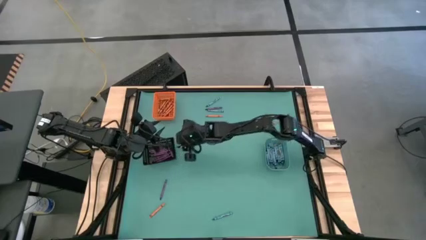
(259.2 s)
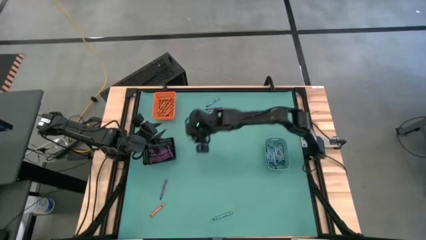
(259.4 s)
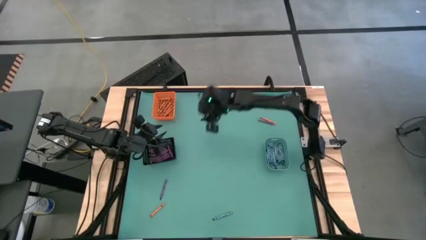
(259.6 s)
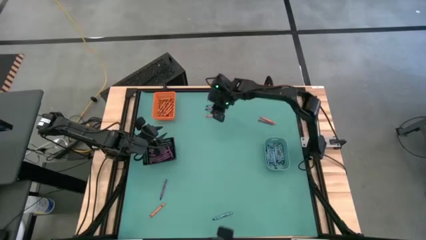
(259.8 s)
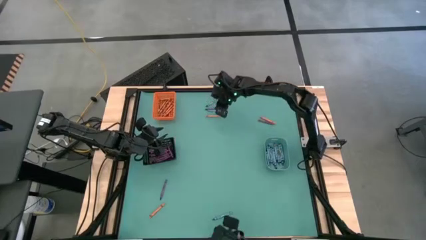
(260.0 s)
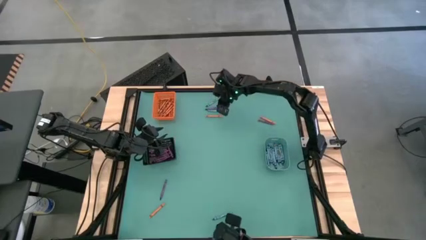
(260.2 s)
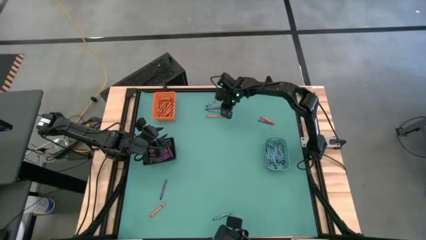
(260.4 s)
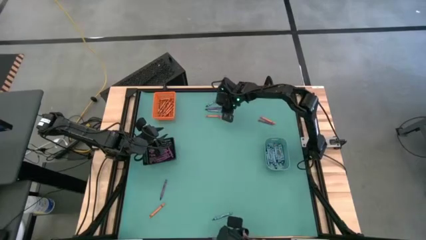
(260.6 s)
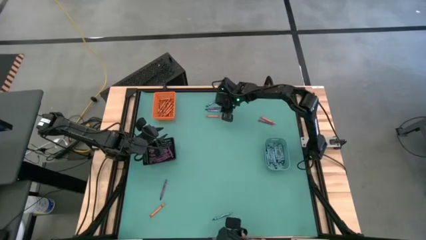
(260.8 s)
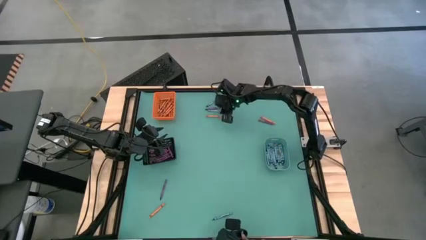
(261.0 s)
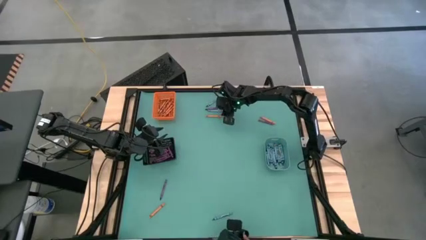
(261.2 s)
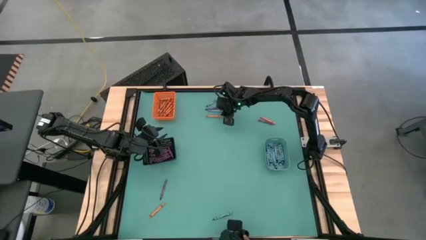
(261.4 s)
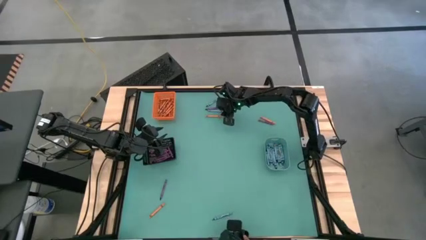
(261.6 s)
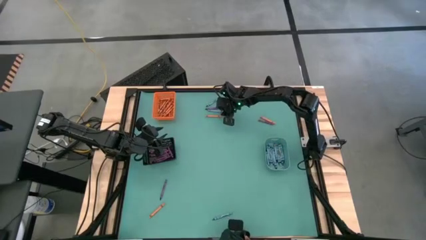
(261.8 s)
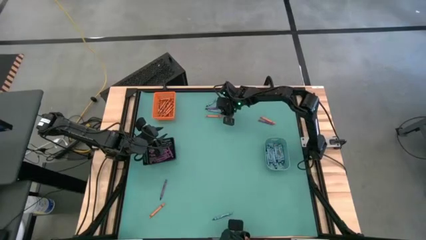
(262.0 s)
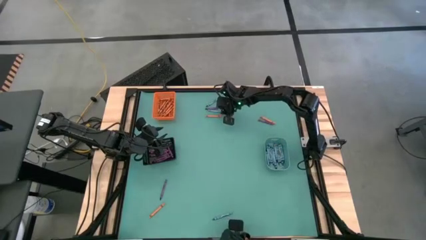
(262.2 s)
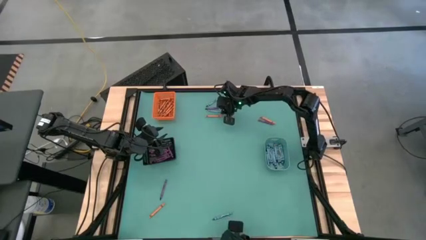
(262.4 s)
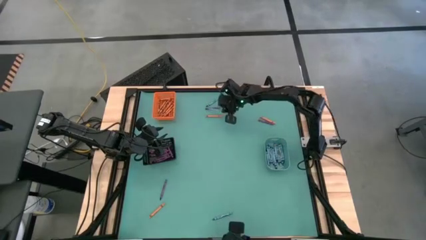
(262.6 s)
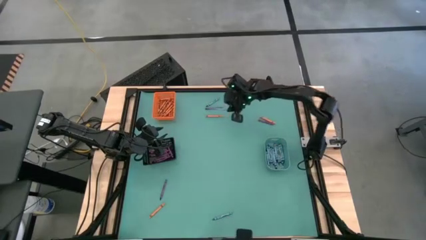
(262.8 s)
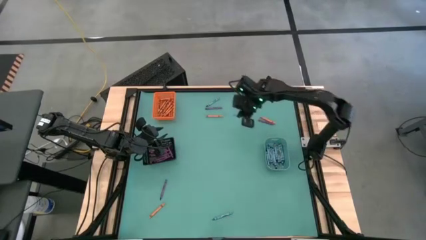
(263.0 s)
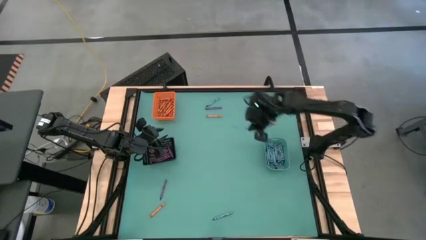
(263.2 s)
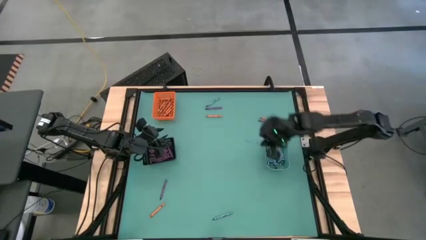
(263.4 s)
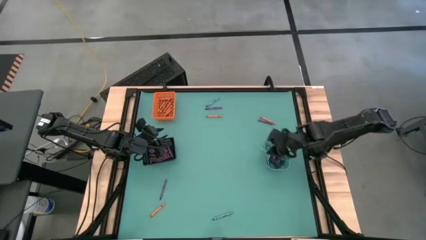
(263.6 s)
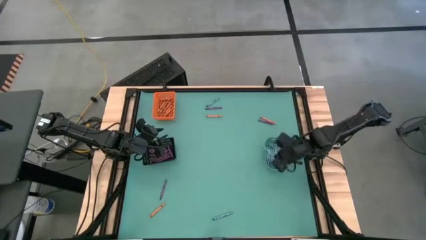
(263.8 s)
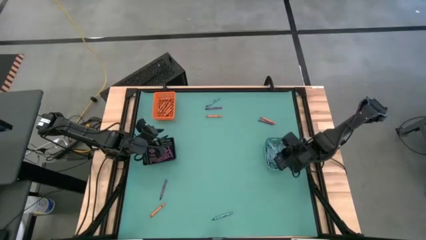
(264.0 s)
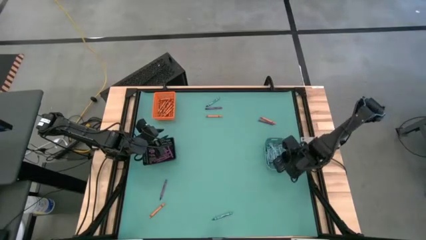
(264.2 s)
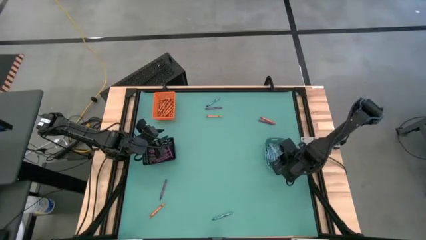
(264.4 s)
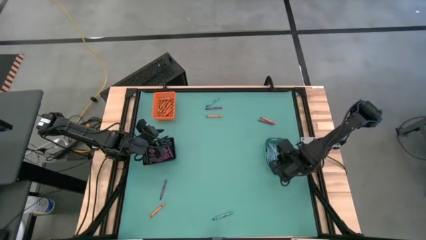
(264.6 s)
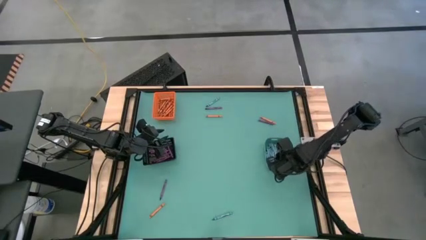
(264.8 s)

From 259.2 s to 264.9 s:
Task: Sort crayons
Put the light blue crayon into the blue bin

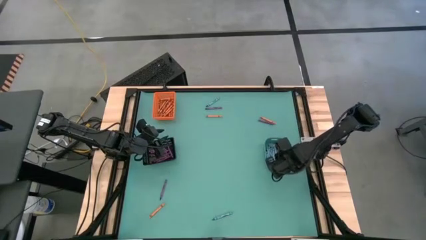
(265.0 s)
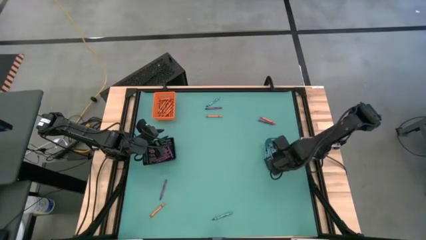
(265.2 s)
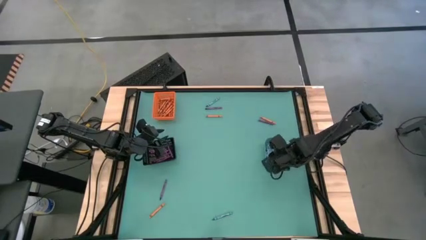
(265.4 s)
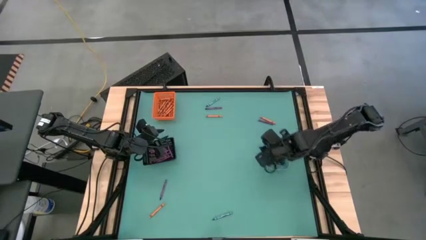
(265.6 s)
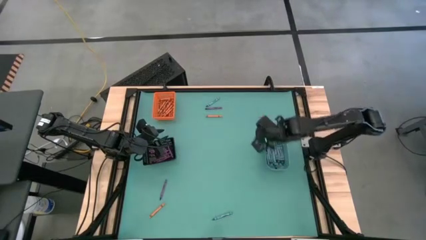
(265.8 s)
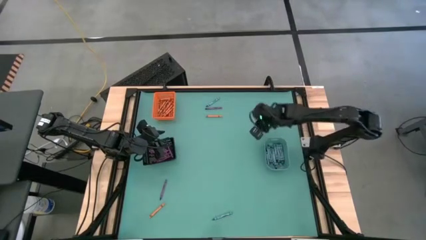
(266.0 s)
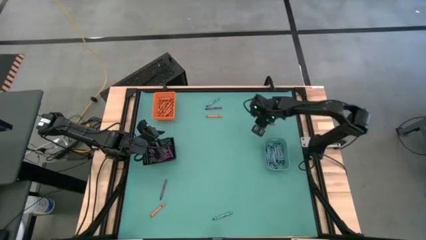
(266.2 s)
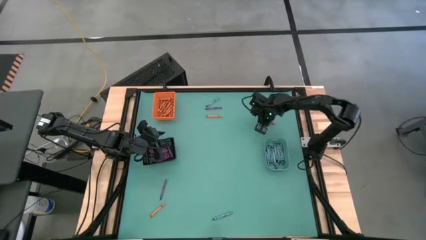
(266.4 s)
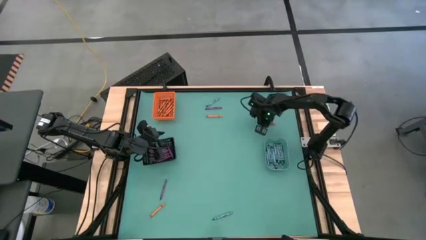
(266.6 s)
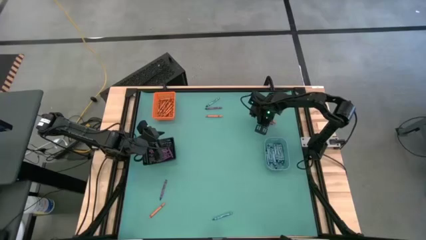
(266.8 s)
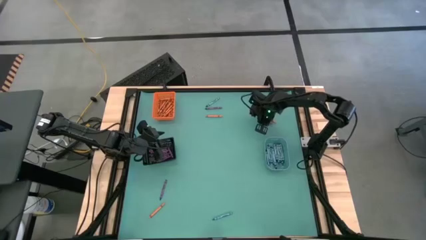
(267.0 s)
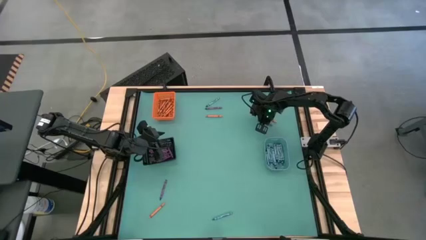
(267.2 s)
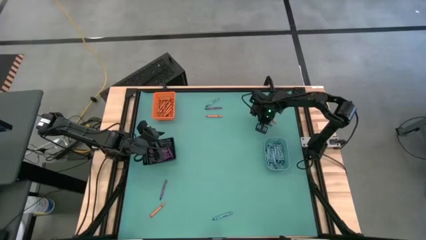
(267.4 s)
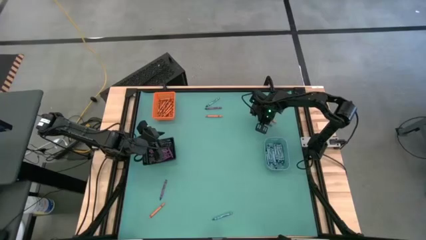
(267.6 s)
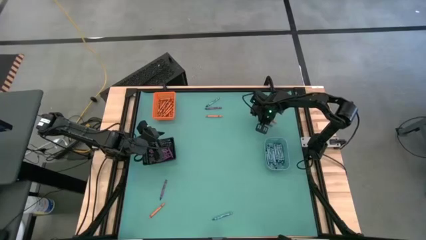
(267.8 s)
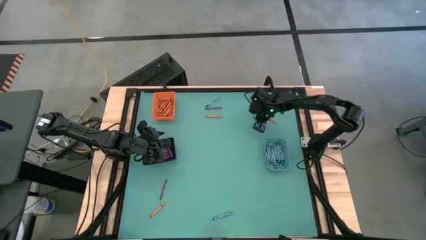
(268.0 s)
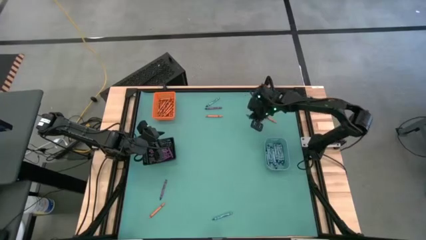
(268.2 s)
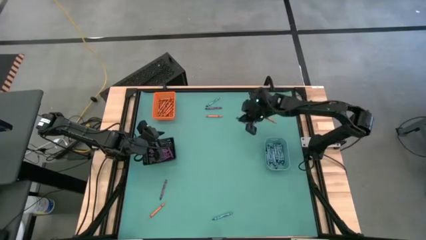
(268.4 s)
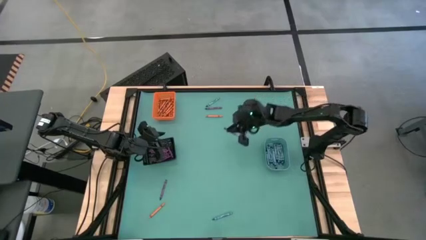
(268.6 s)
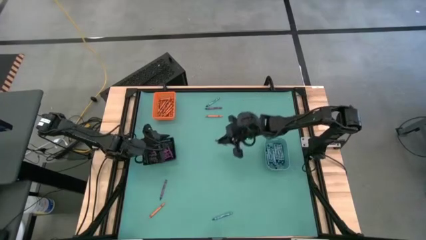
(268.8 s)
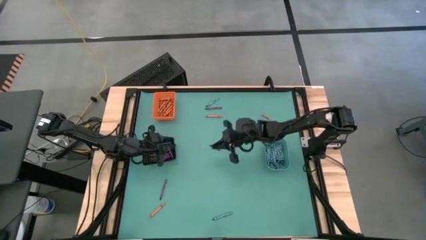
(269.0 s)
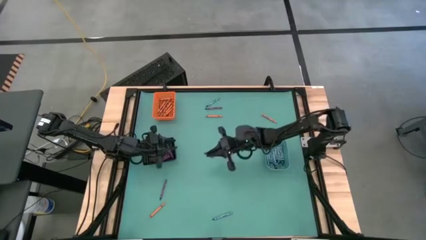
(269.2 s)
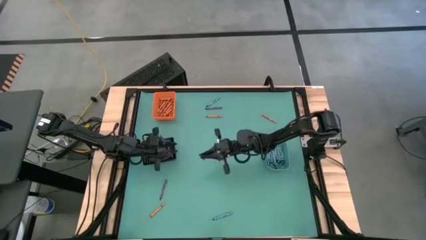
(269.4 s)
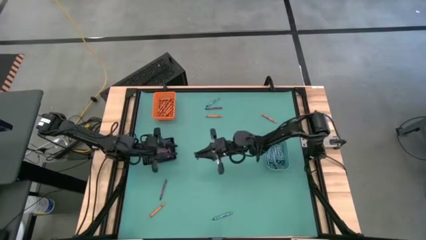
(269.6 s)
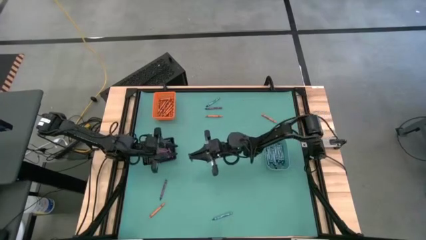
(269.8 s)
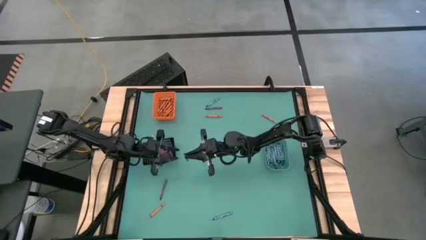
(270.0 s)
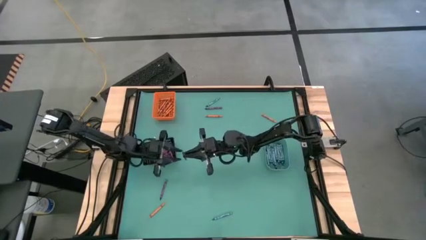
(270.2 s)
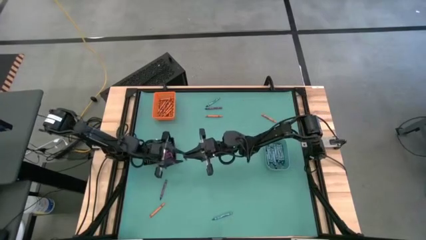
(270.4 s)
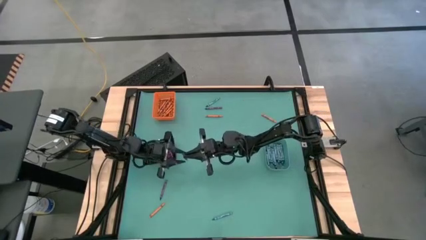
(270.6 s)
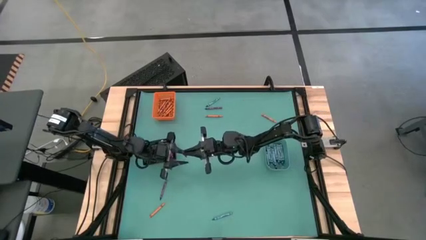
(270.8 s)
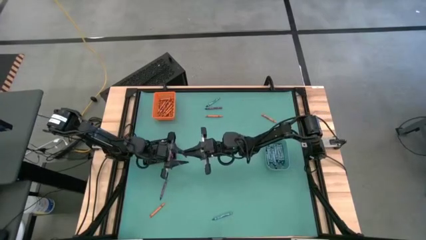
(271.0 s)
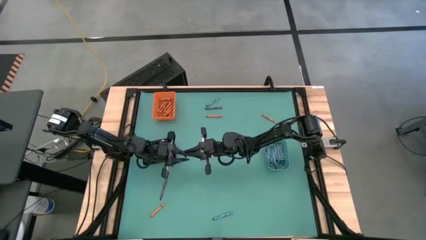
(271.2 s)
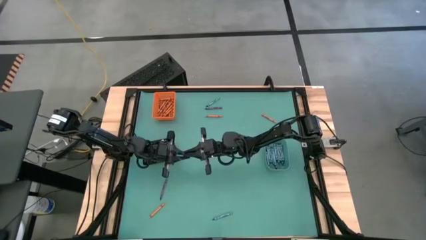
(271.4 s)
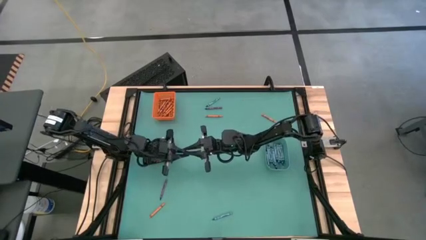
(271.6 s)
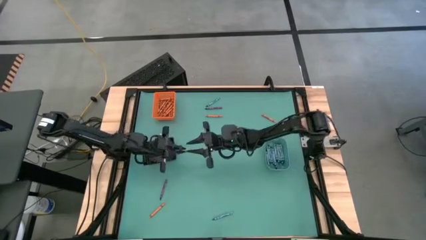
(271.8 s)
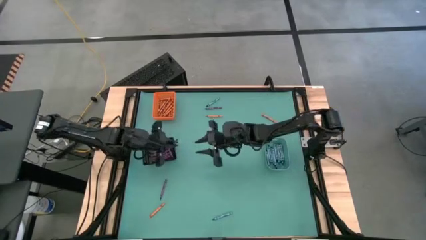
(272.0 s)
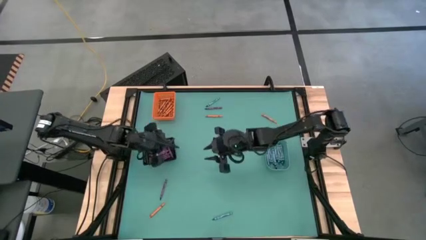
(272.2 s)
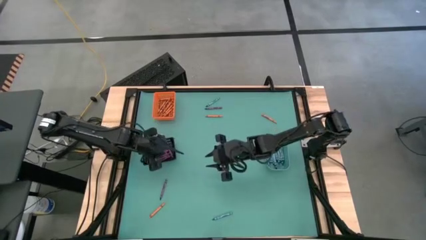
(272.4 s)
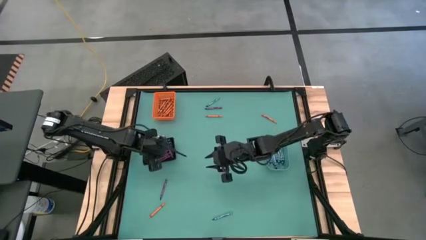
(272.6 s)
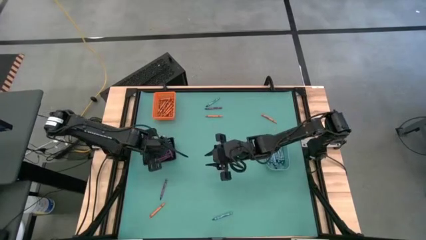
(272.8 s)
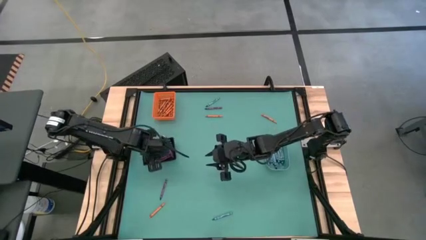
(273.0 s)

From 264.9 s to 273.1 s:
Put the violet crayon into the black bin

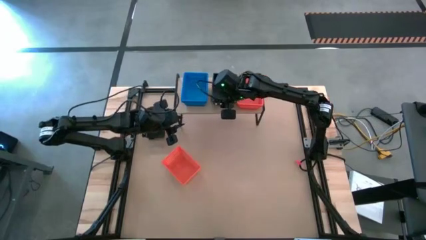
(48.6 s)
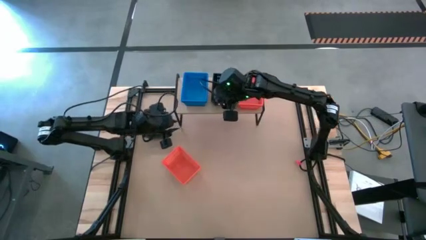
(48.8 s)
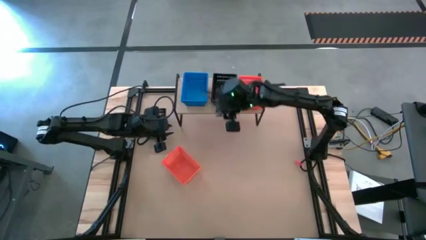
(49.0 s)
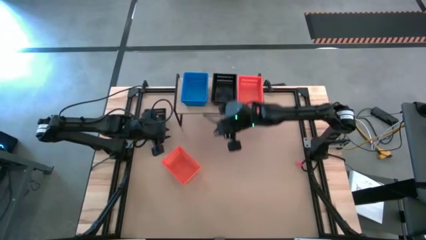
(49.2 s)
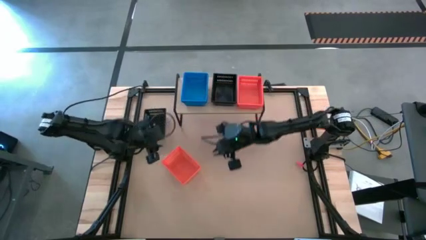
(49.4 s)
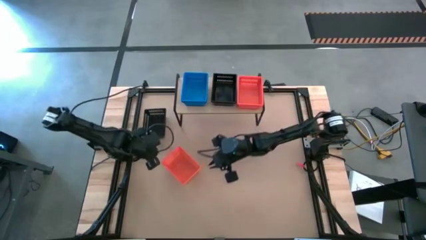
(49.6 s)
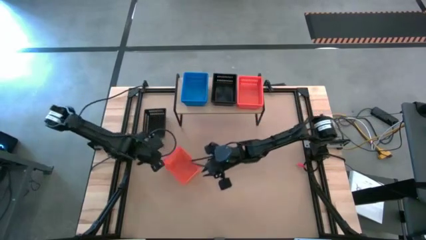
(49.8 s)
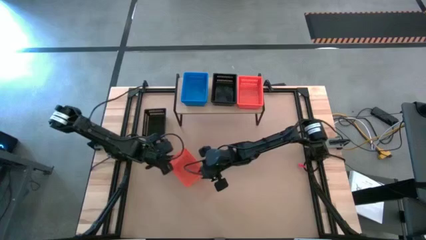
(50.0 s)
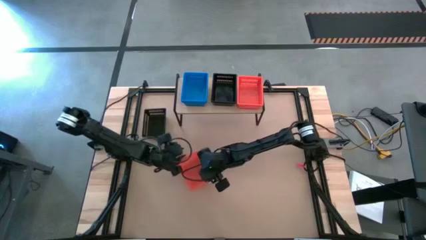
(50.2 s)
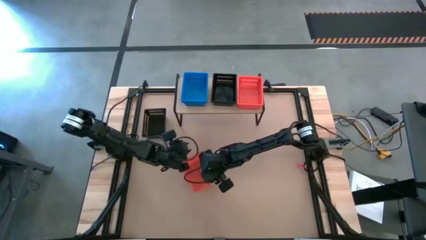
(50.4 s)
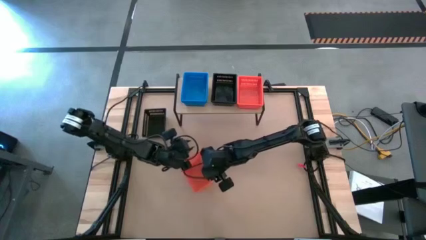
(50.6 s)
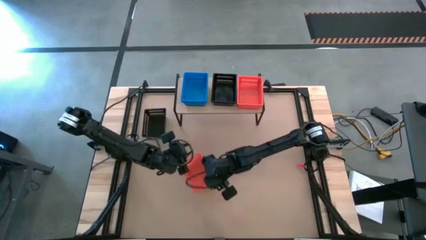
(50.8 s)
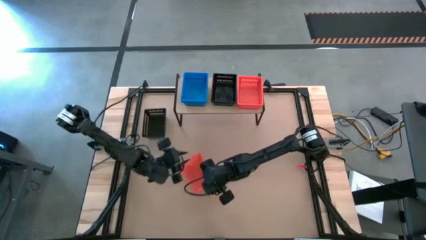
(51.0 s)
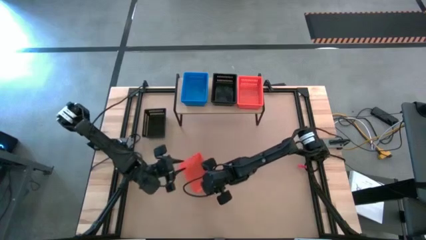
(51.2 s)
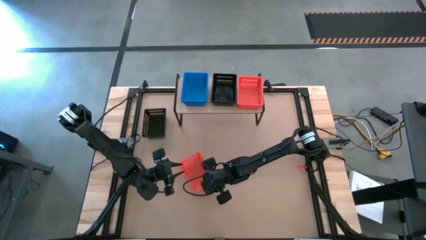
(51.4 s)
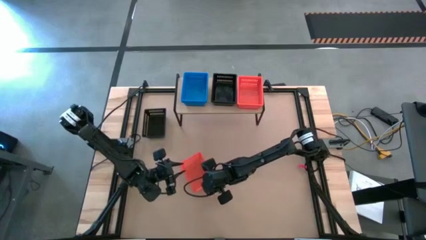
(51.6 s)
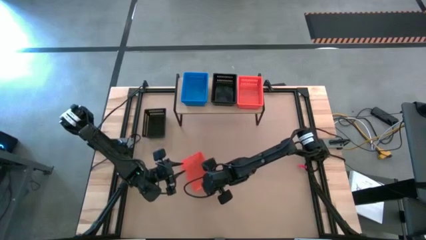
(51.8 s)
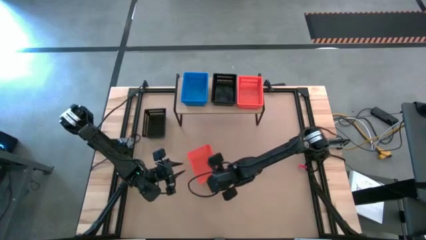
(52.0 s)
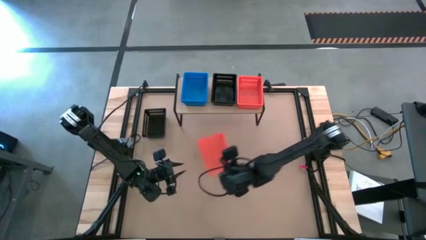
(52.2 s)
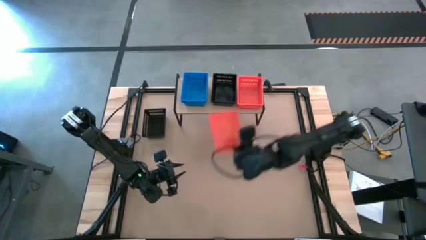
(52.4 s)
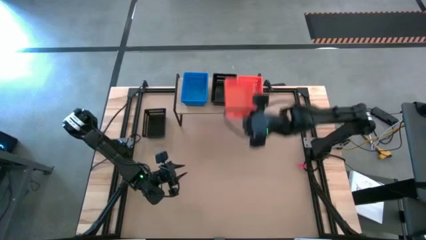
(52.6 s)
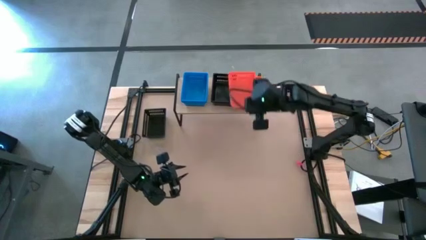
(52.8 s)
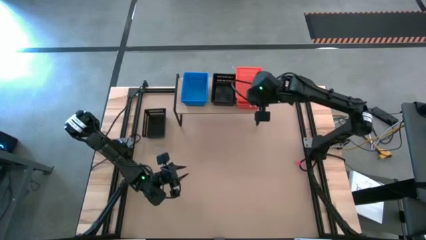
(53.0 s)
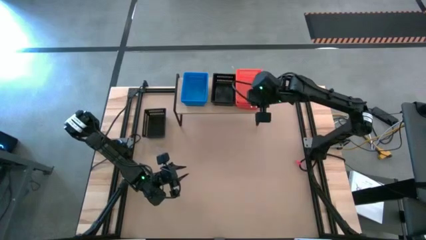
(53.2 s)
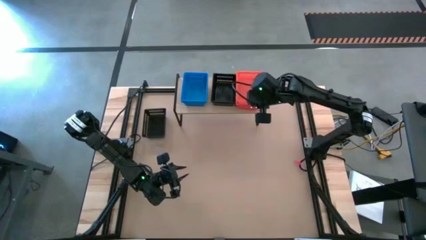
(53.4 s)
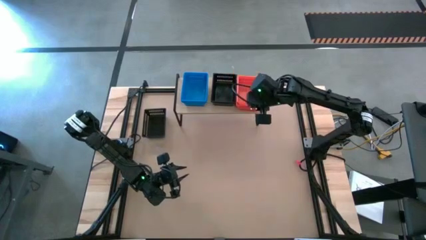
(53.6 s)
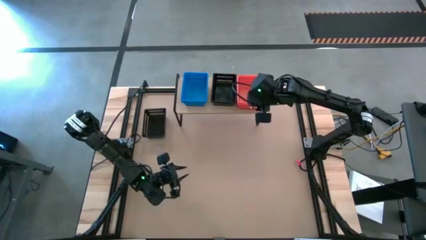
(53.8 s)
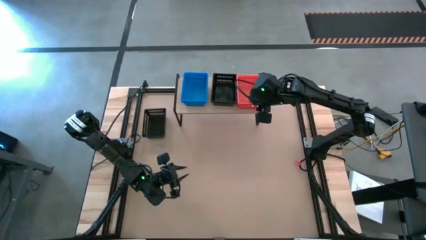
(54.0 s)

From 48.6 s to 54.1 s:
Task: Stack baskets on shelf by color
Stack the orange bin on top of the orange bin on the shelf
